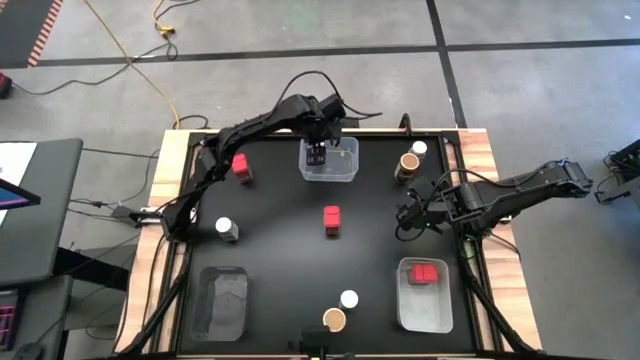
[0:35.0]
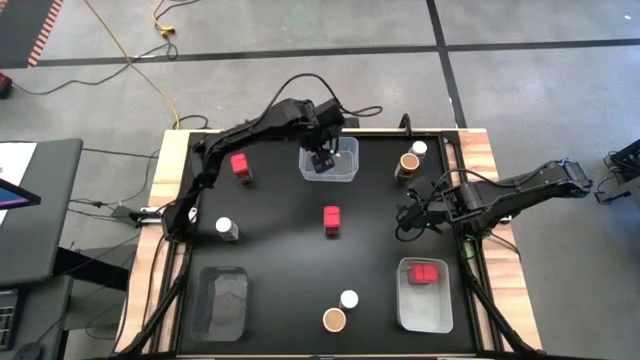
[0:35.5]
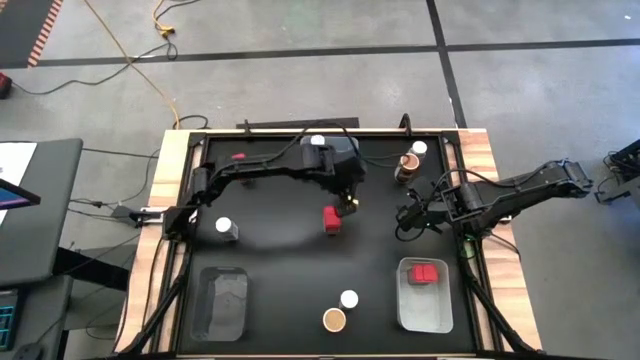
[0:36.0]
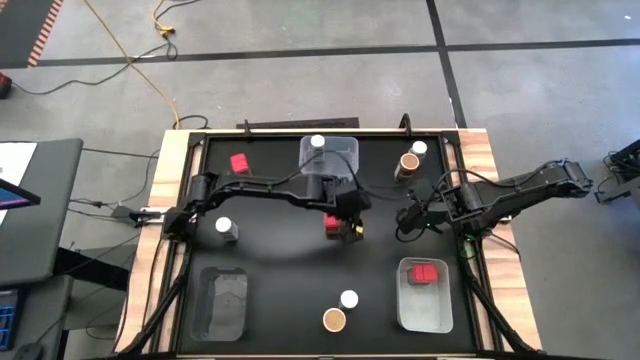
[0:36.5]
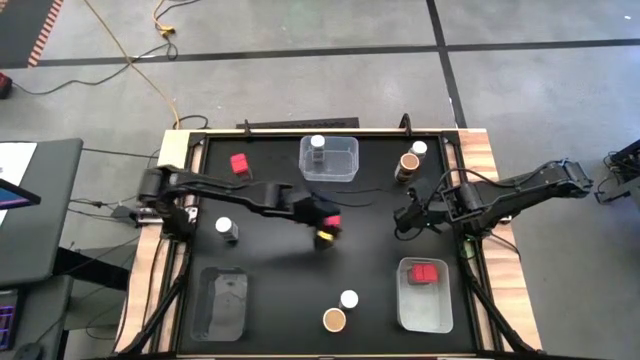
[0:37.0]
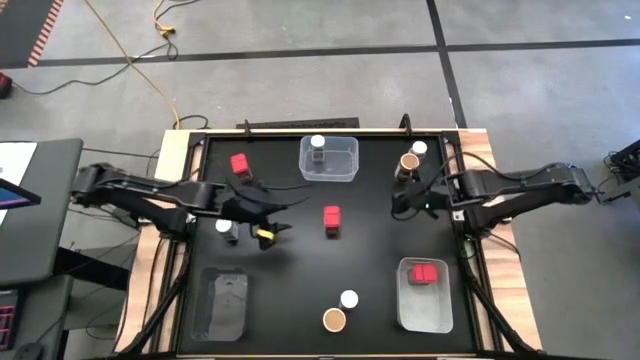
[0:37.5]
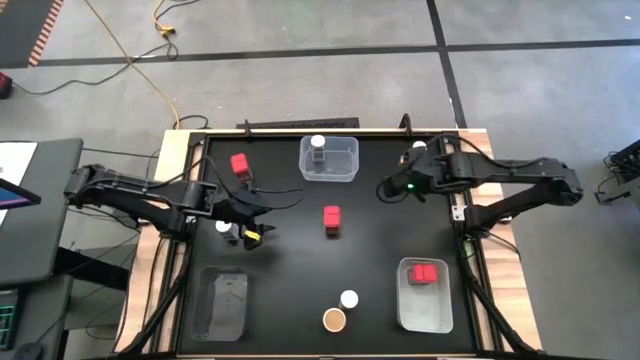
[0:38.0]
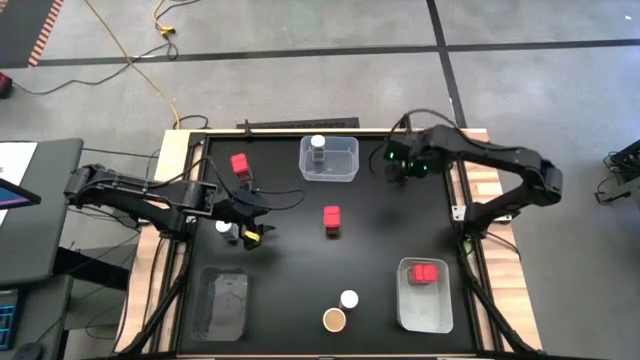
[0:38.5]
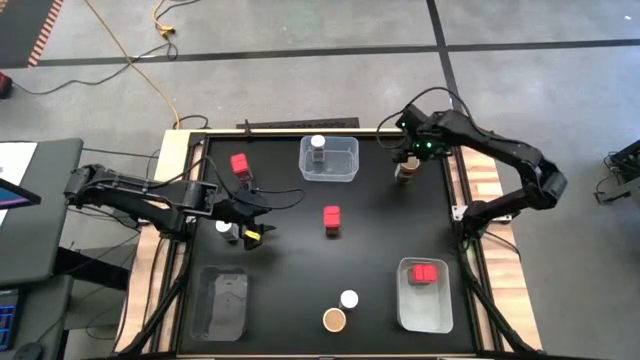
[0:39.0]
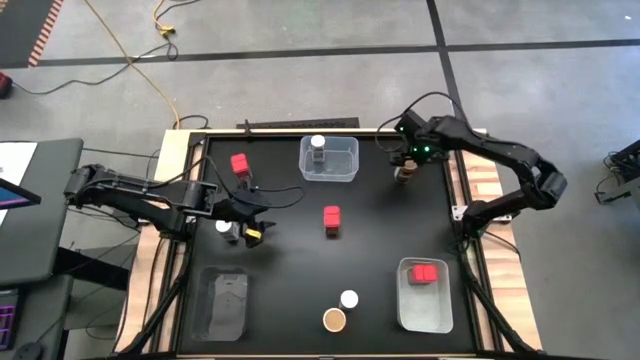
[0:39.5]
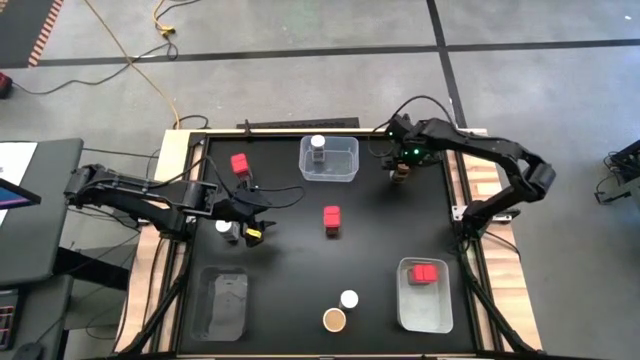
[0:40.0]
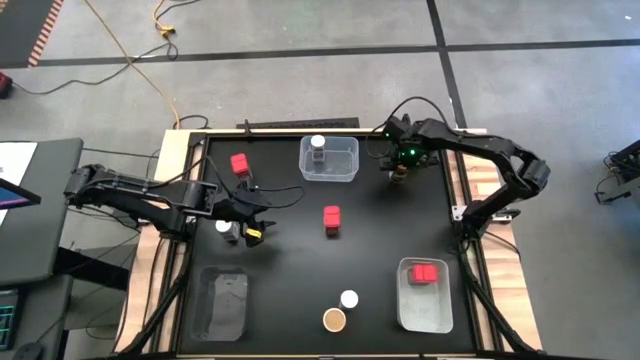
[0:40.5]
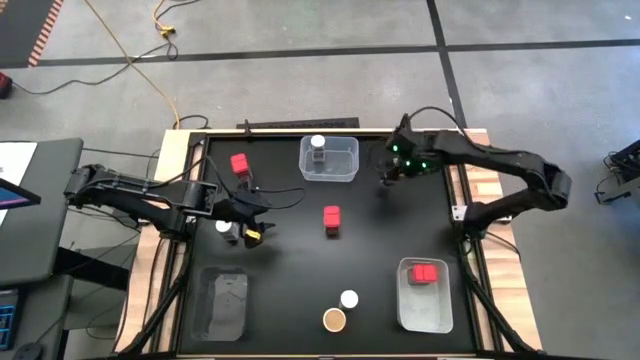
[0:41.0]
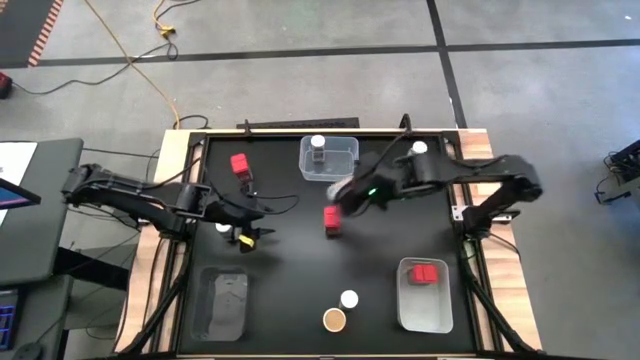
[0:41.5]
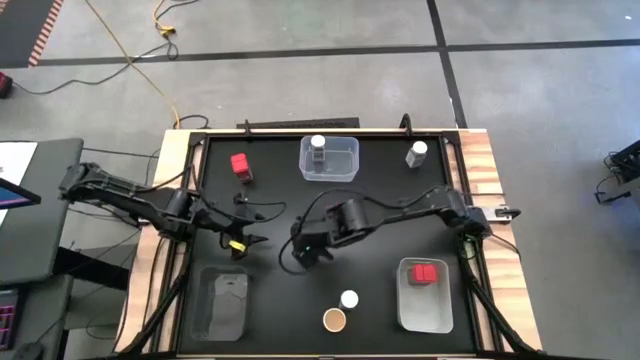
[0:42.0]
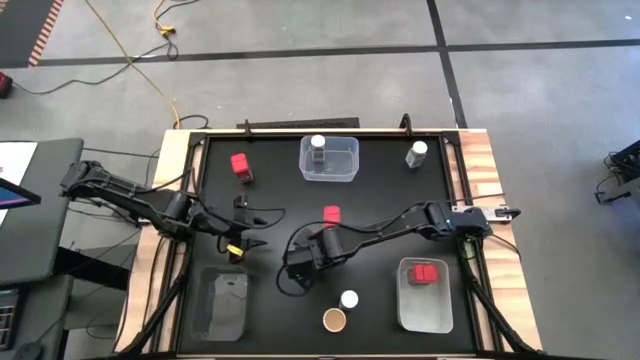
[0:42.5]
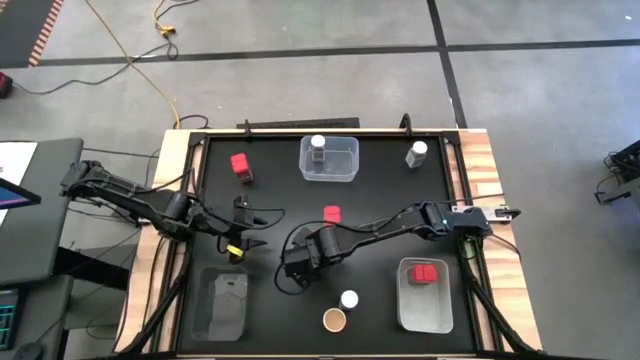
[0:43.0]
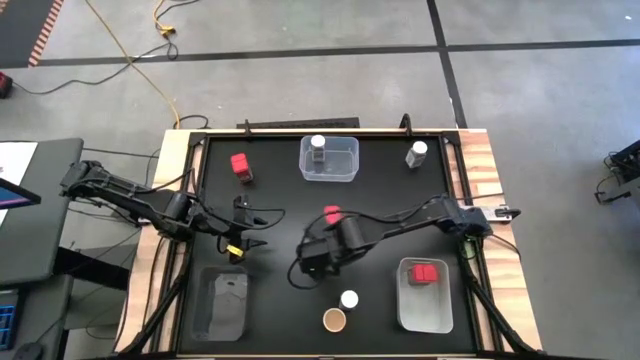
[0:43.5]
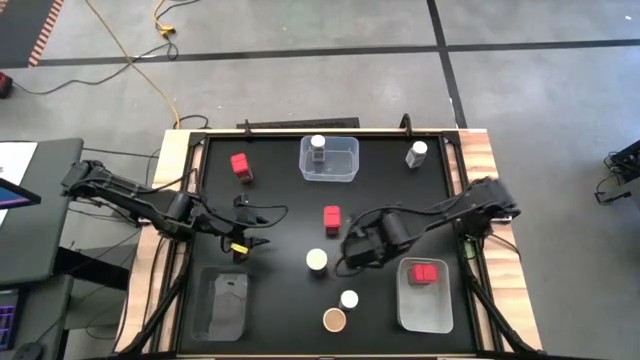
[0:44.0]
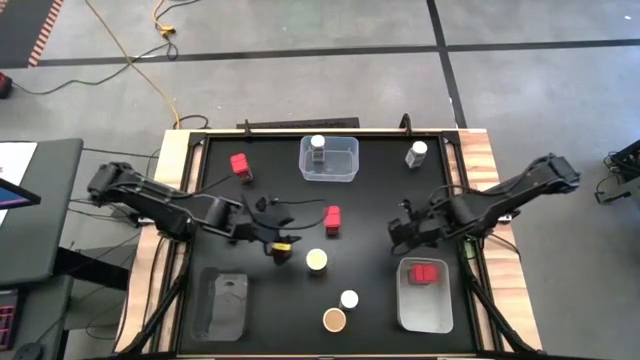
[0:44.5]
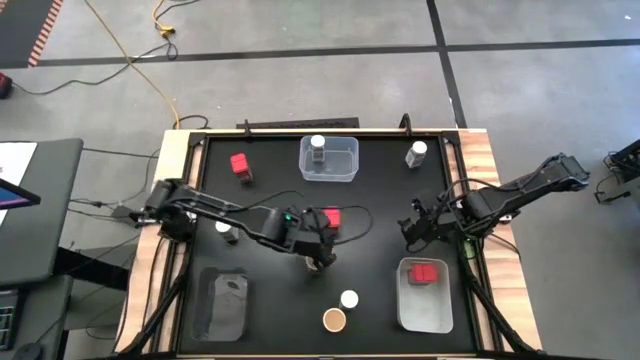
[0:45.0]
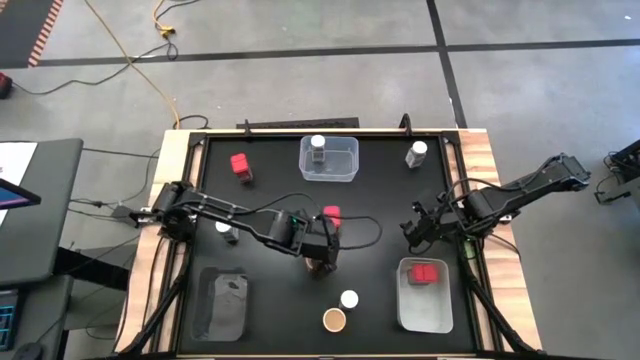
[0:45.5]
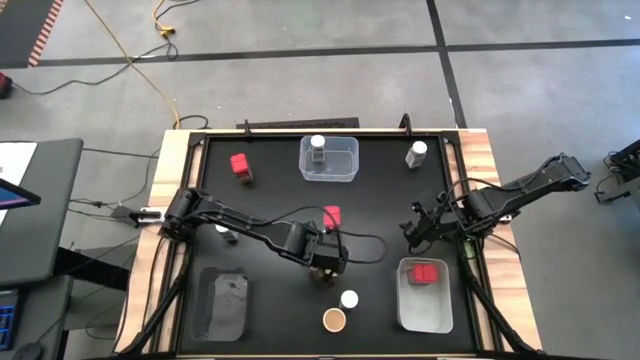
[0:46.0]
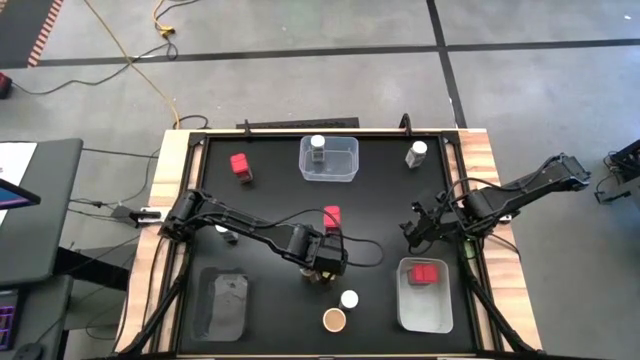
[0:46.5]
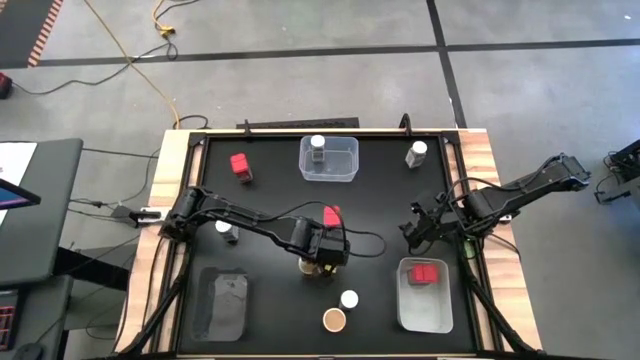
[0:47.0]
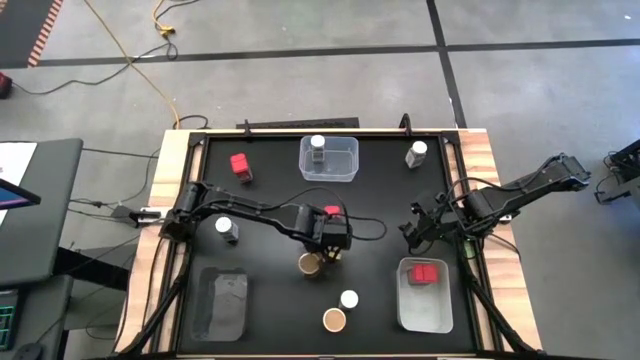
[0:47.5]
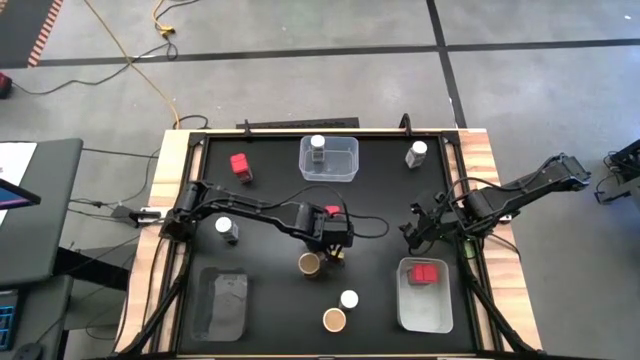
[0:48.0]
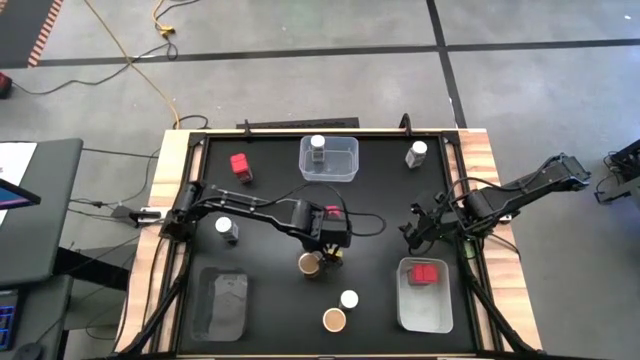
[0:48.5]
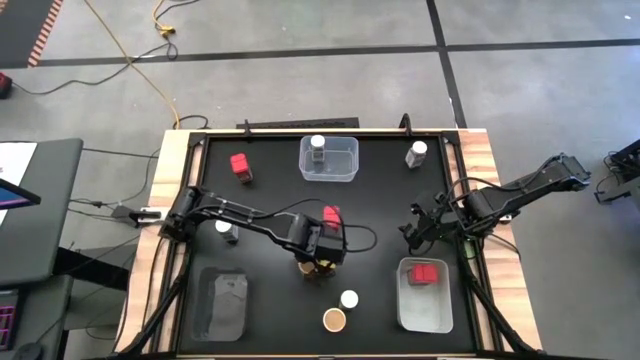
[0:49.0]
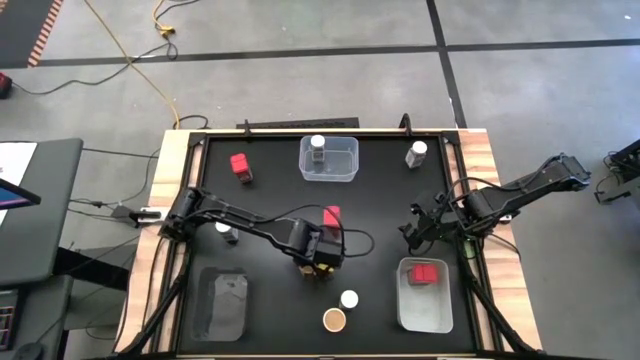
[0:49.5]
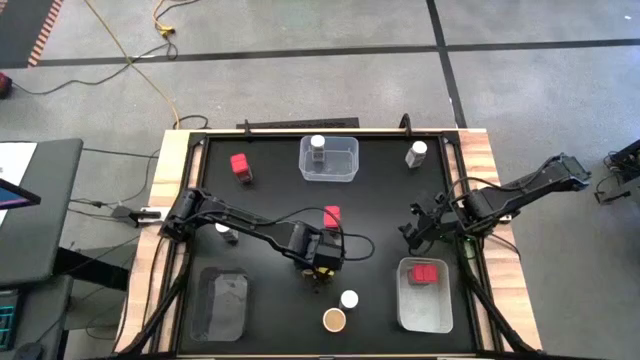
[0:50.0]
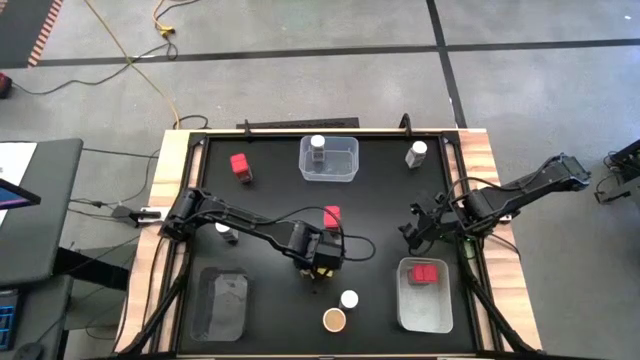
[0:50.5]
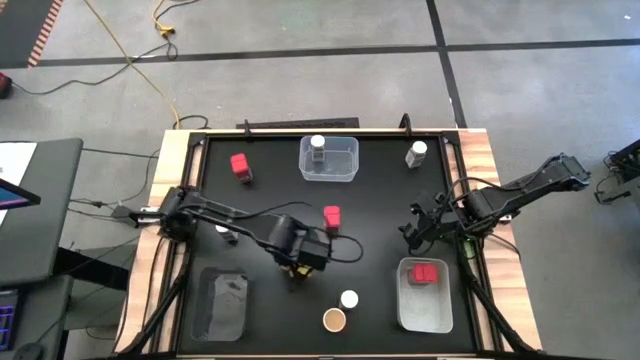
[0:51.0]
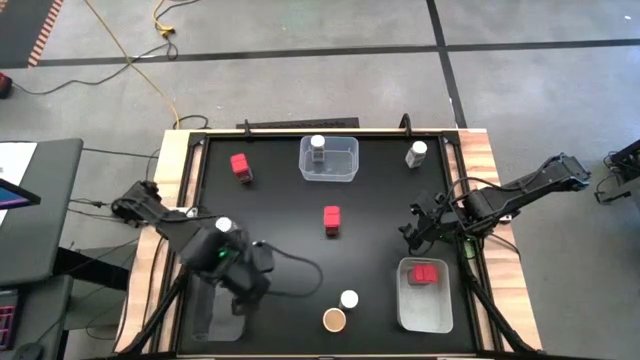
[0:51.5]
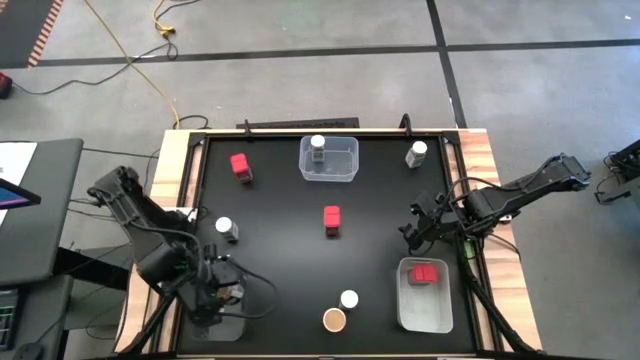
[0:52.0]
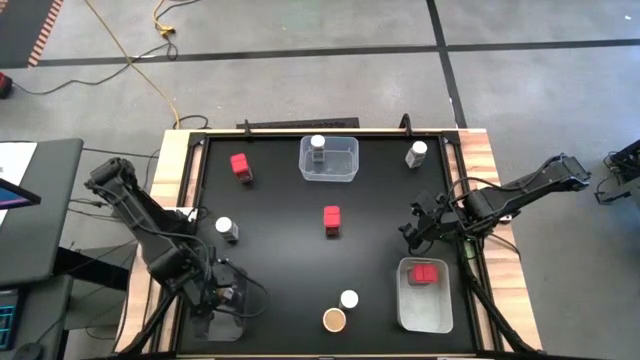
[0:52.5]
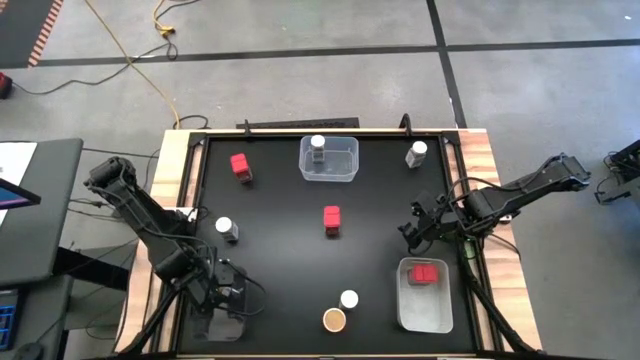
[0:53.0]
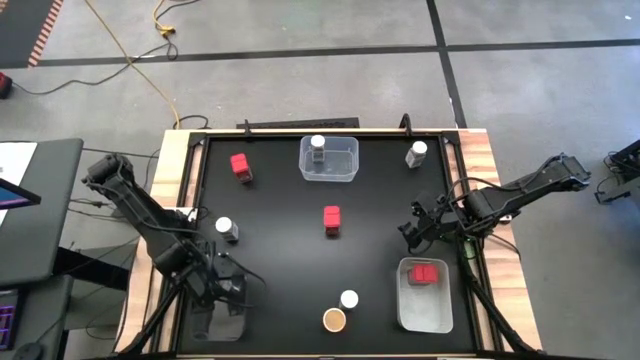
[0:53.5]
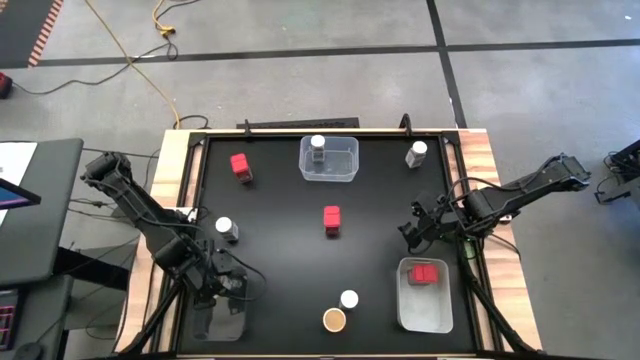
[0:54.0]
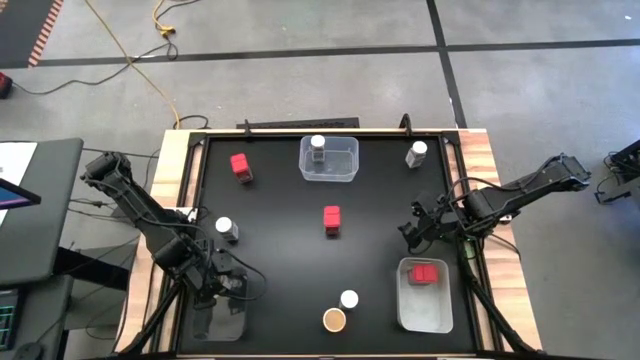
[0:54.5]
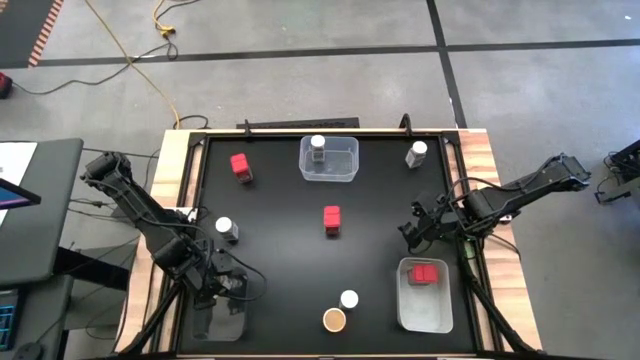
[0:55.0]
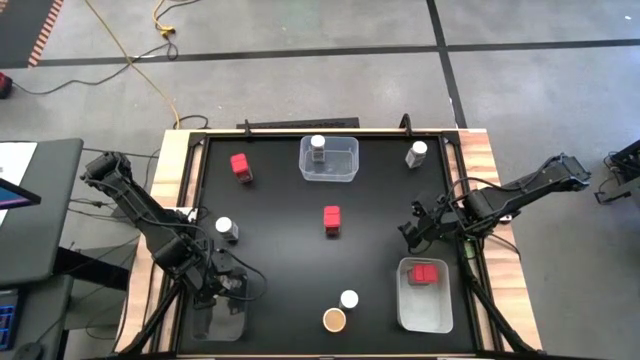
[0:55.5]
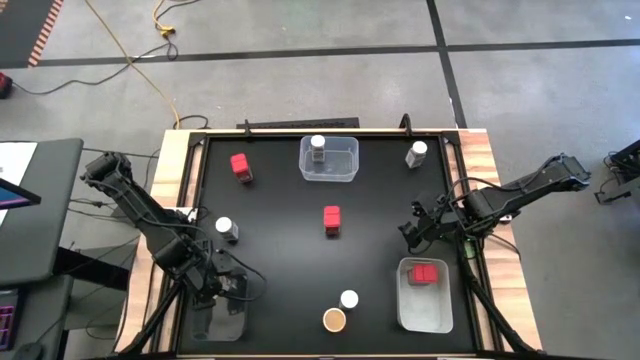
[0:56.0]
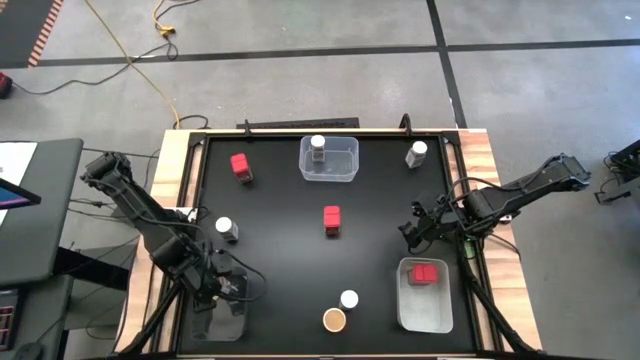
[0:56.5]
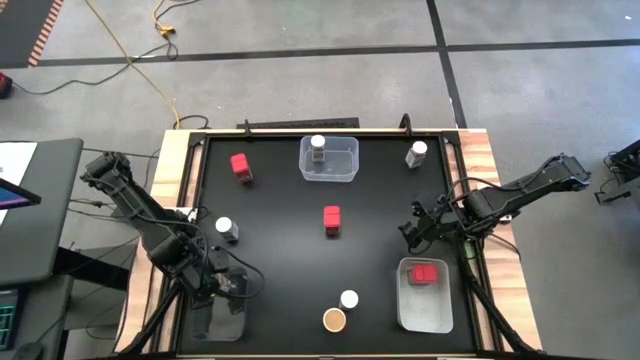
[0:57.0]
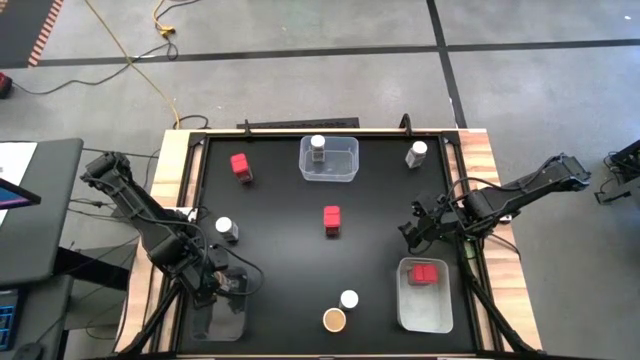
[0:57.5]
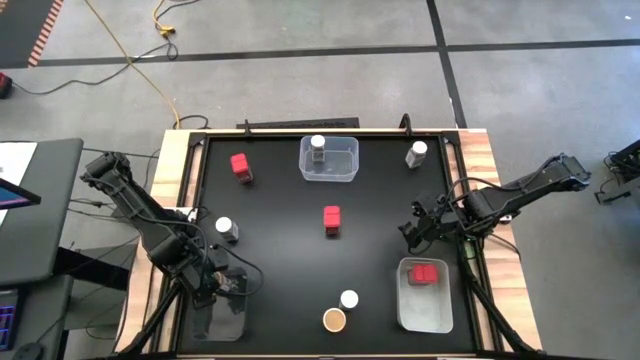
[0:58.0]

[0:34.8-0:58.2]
Task: Sort spices by type
Put the top brown spice bottle into the black bin
